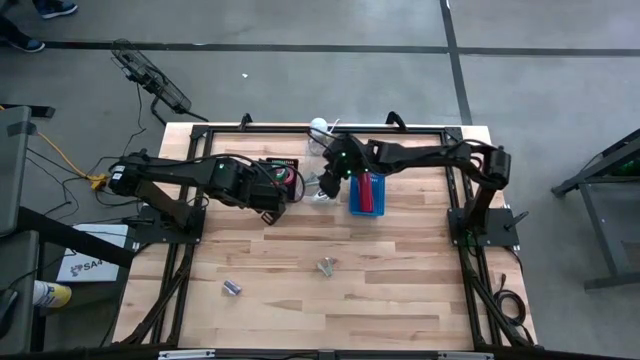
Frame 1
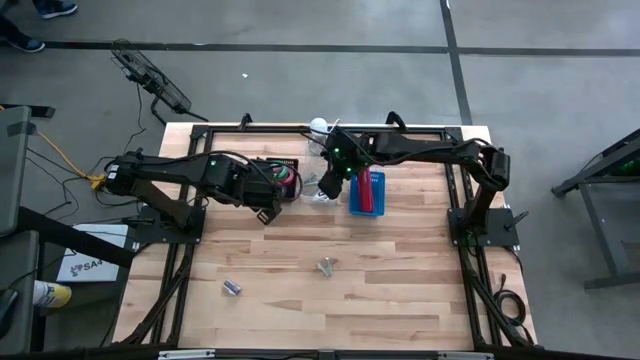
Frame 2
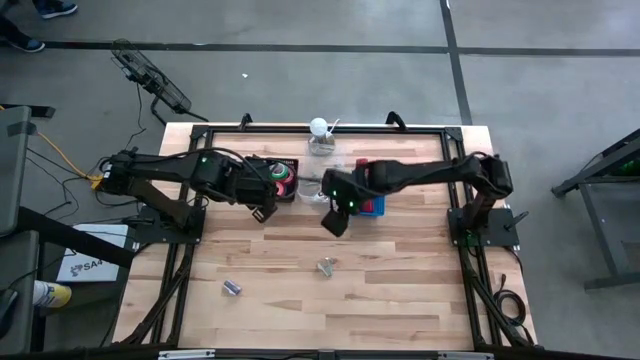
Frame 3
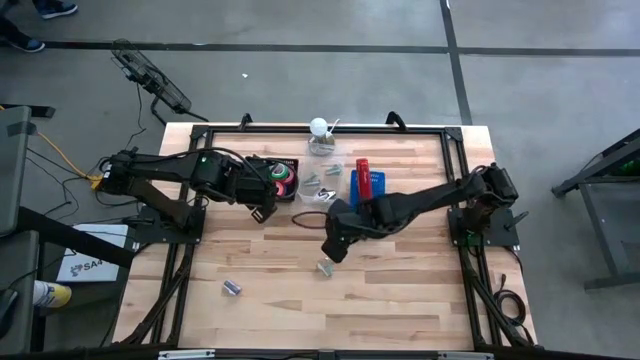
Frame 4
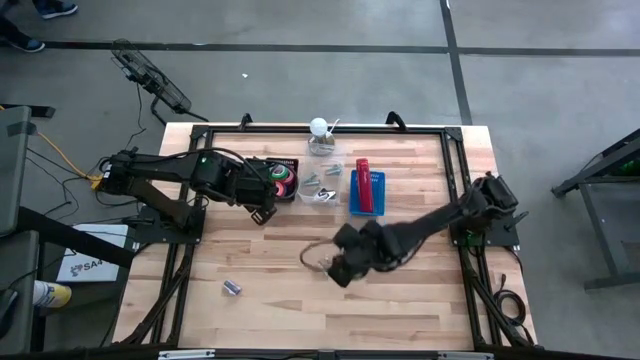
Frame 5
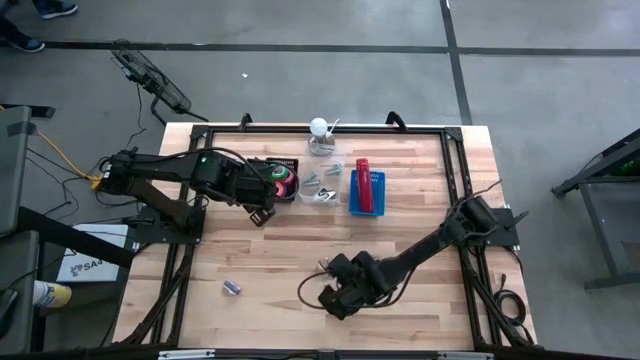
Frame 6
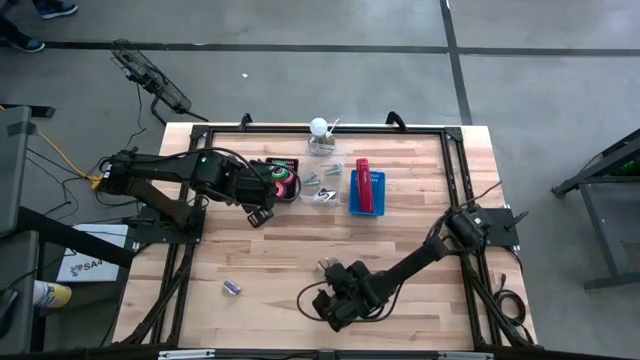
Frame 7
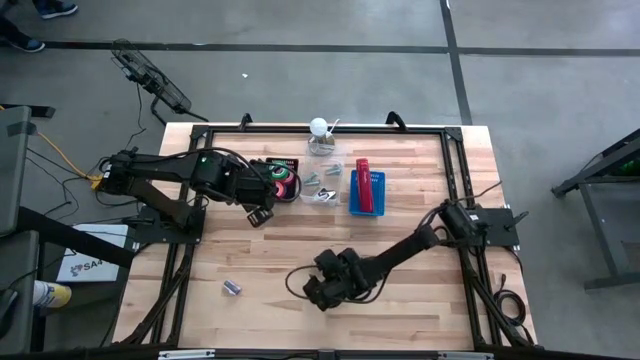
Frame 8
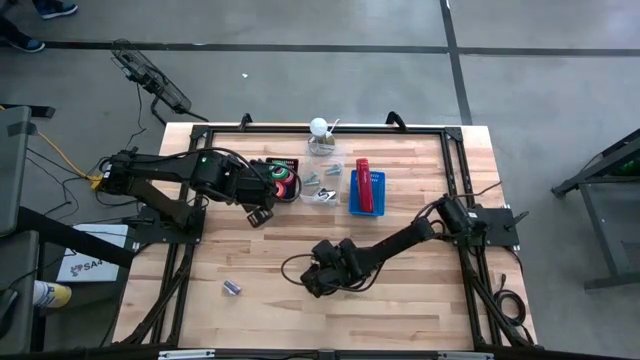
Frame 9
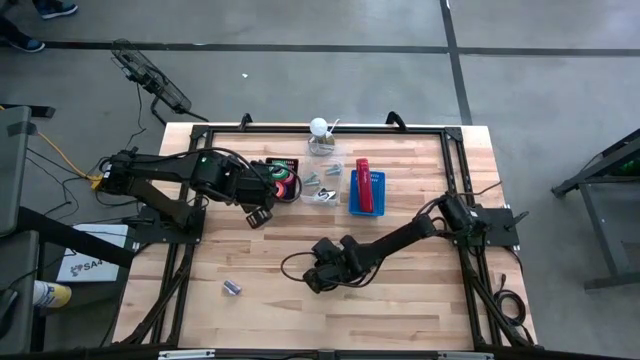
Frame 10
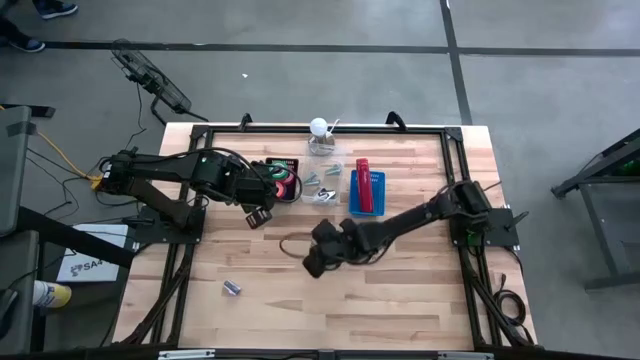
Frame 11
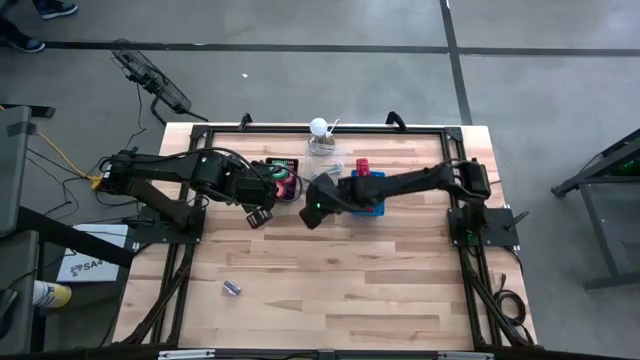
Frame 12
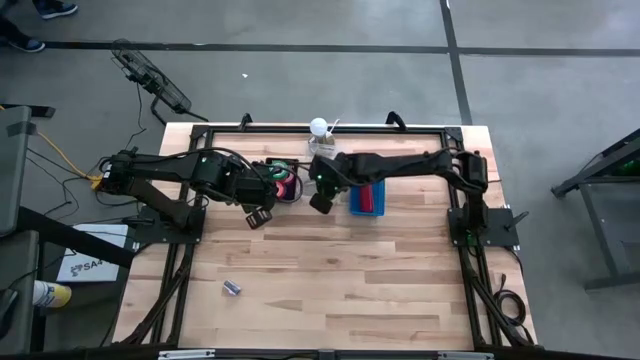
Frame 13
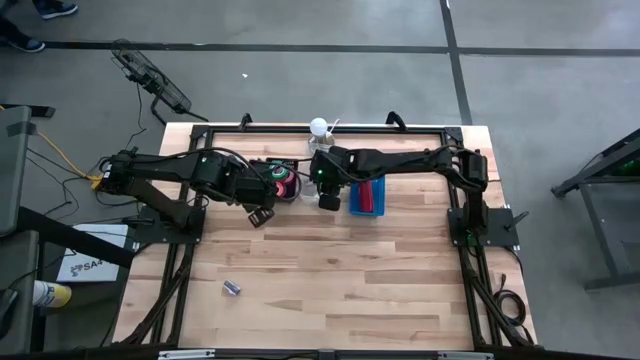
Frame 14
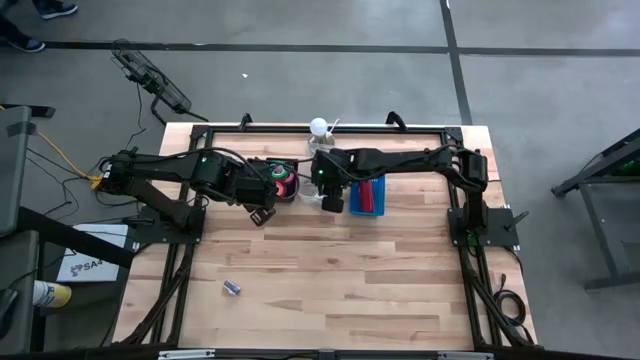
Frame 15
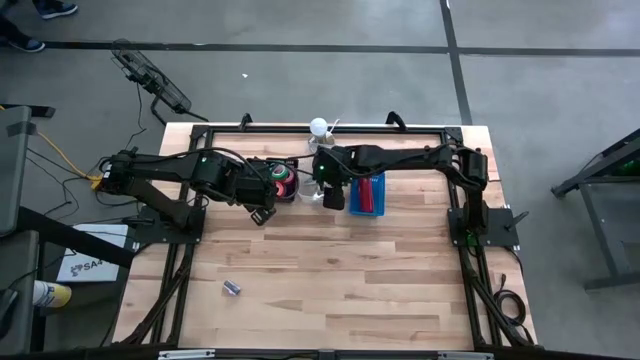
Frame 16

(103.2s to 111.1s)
Task: Pick and place Stapler, Stapler remover, tape
Put the gray staple remover into the transparent bin

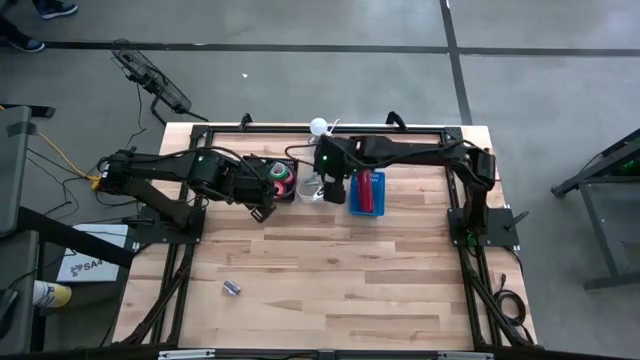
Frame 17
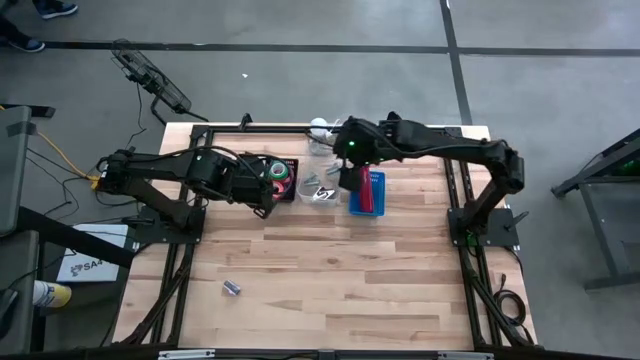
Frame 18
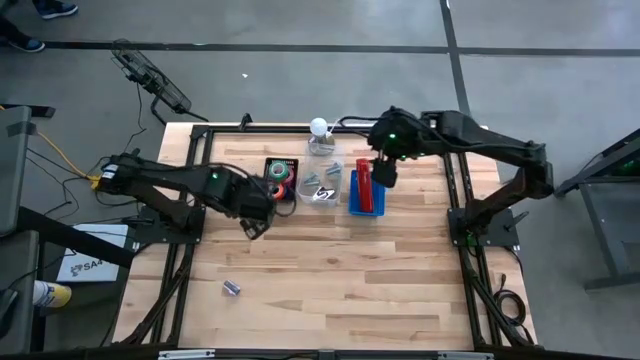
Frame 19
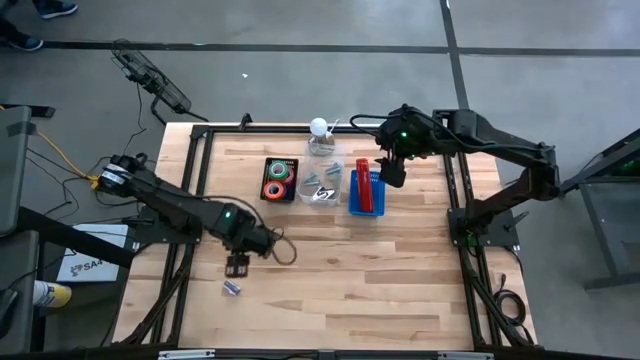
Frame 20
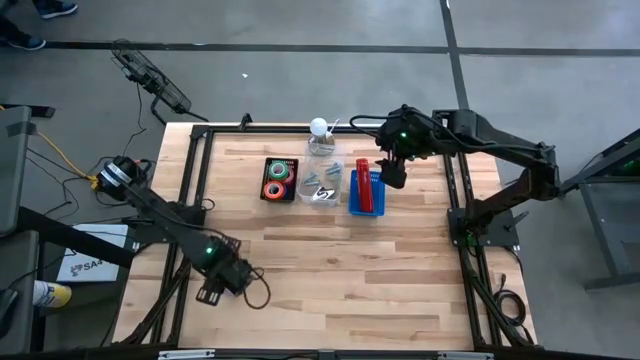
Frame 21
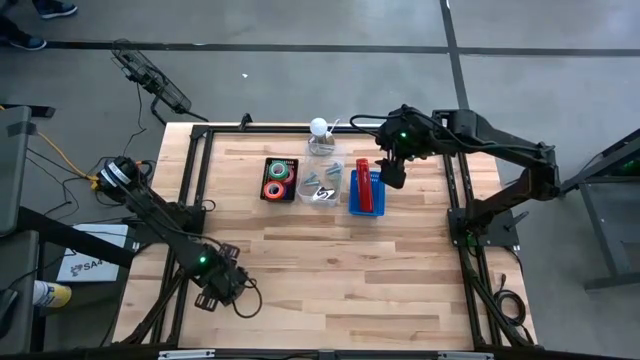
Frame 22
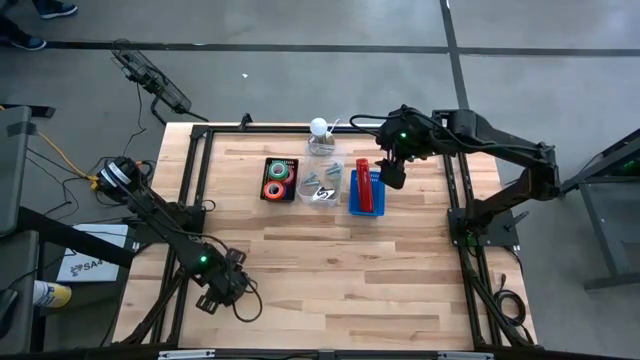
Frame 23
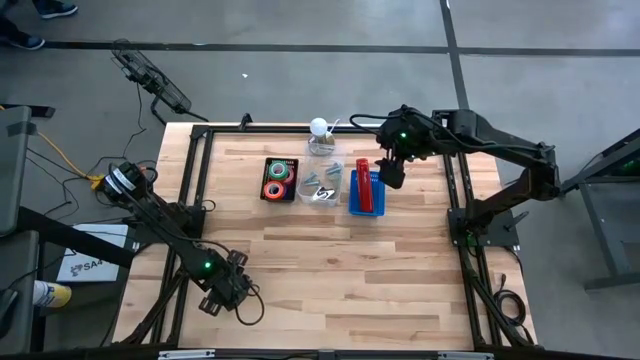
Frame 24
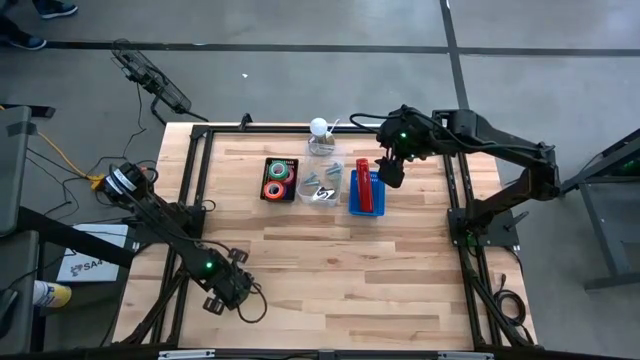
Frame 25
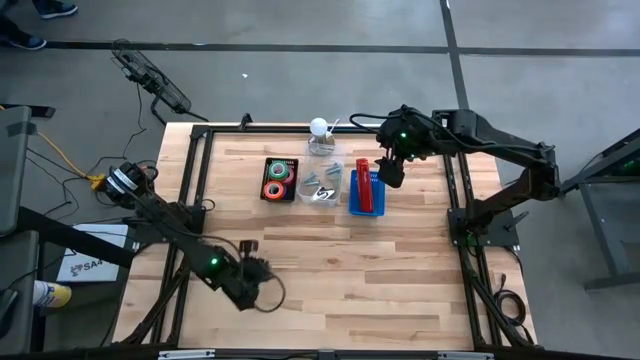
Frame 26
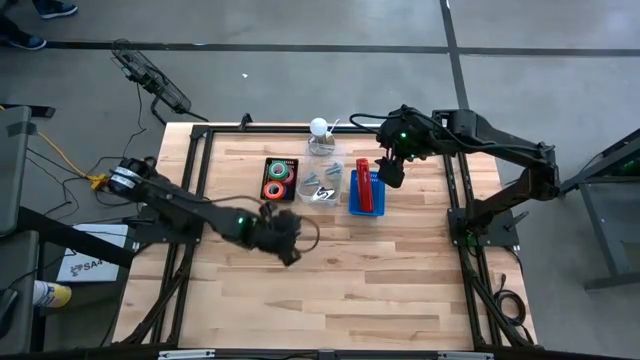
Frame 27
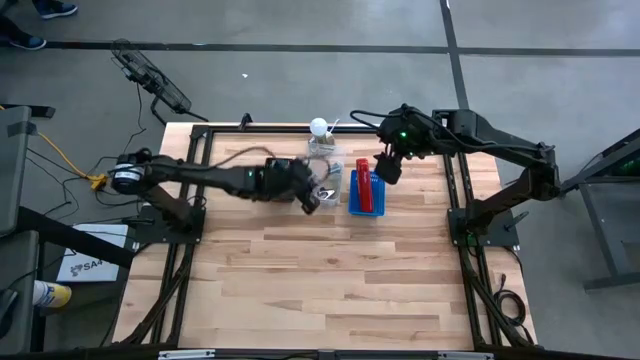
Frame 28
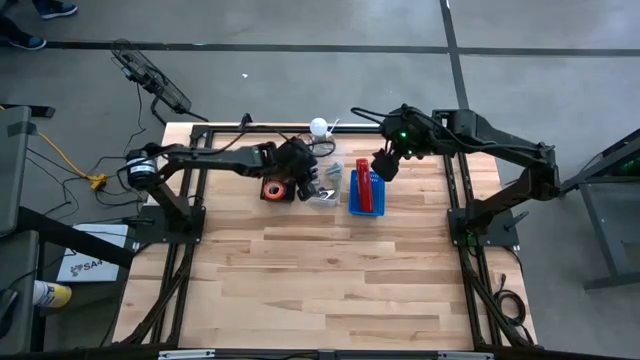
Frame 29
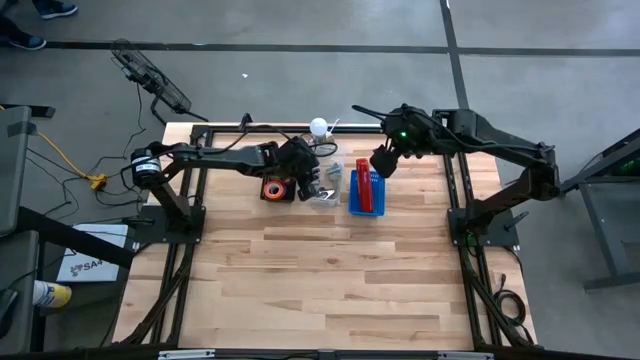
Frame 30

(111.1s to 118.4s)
Put the purple staple remover into the transparent bin

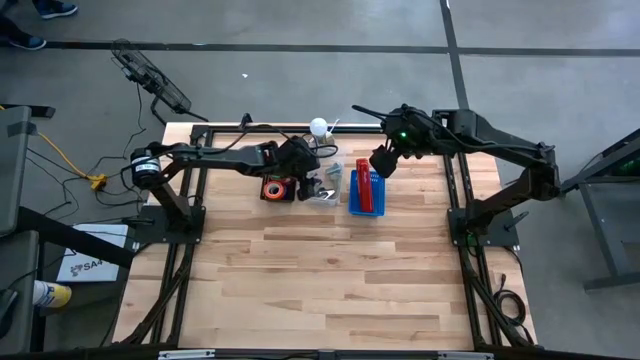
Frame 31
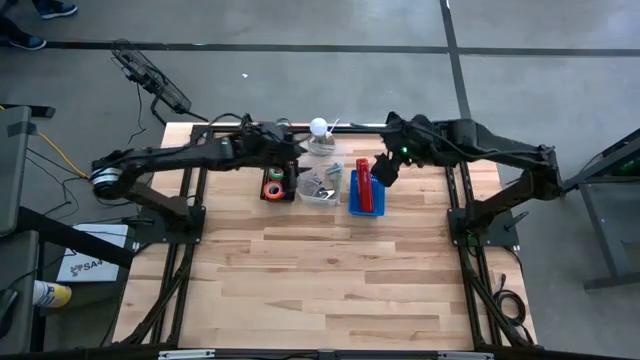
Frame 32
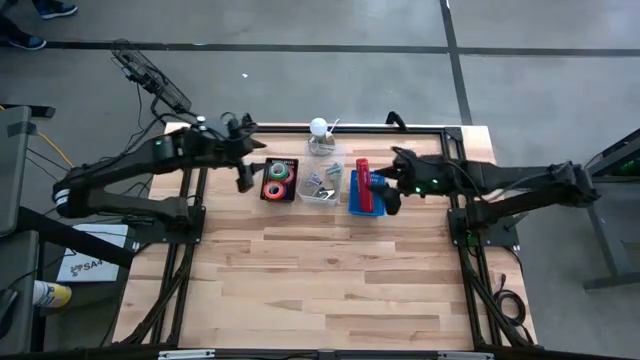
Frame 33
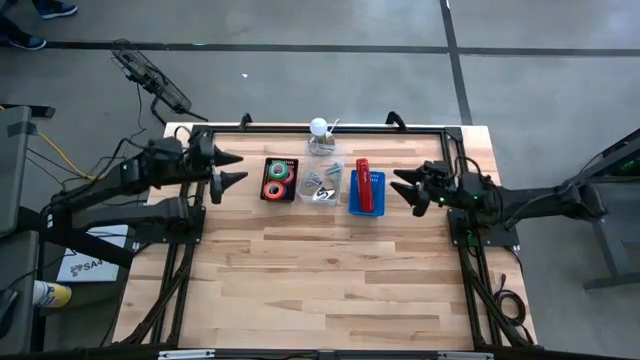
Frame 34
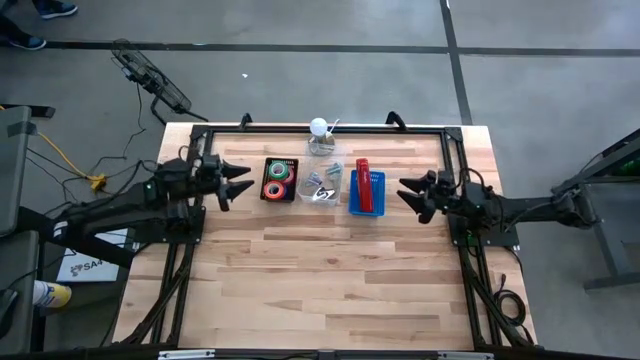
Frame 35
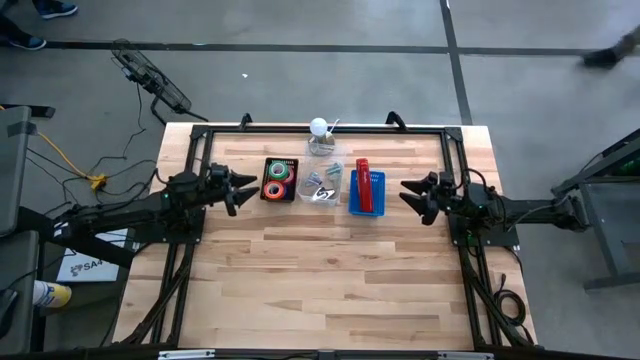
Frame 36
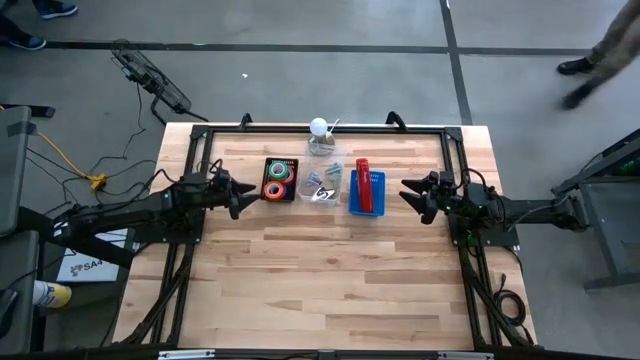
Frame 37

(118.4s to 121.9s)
Return to Home Position

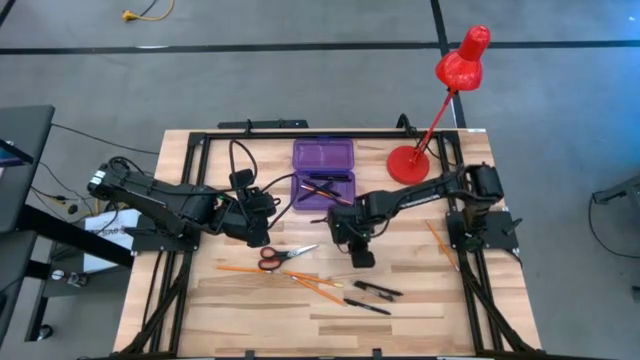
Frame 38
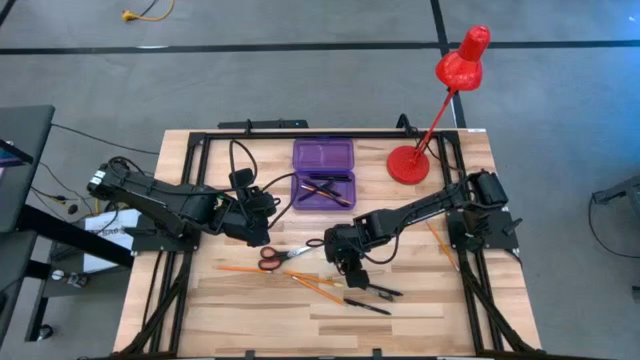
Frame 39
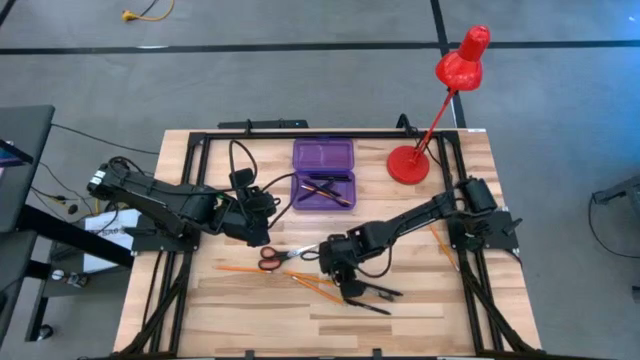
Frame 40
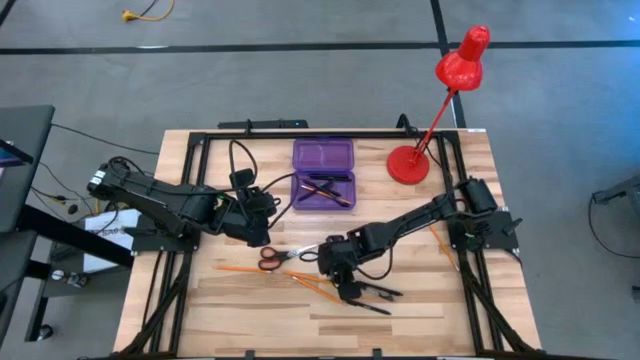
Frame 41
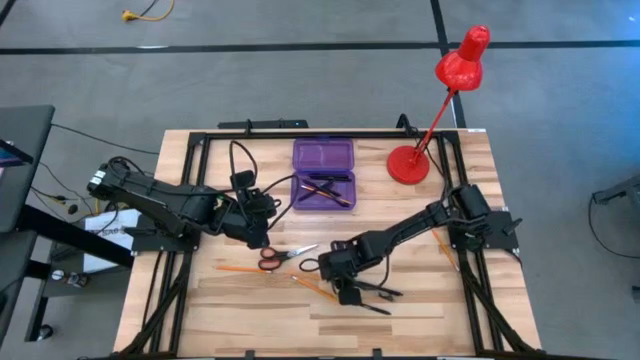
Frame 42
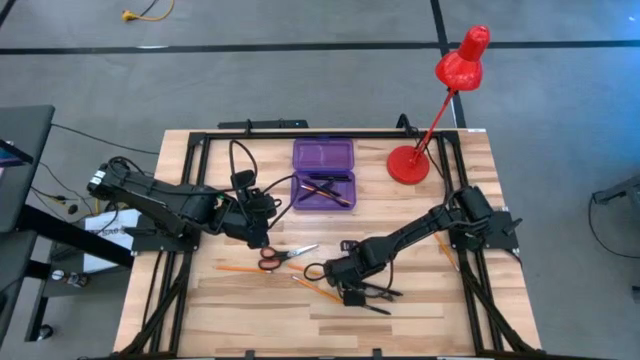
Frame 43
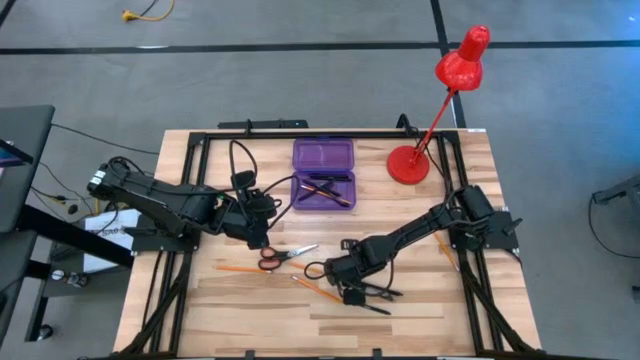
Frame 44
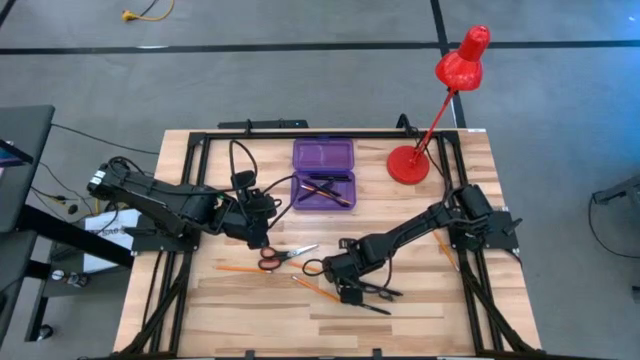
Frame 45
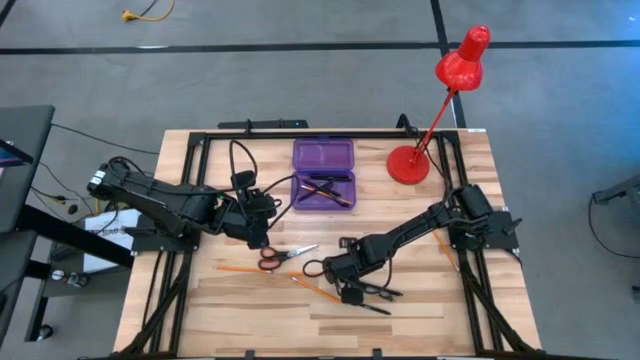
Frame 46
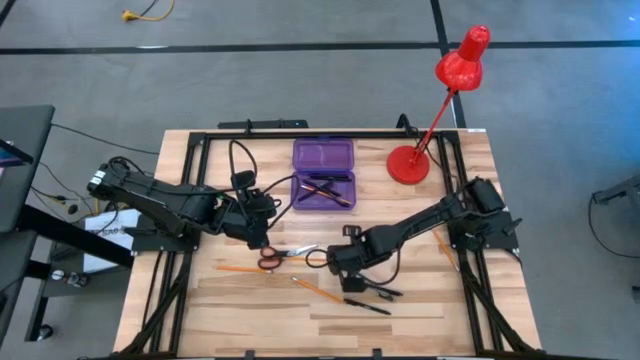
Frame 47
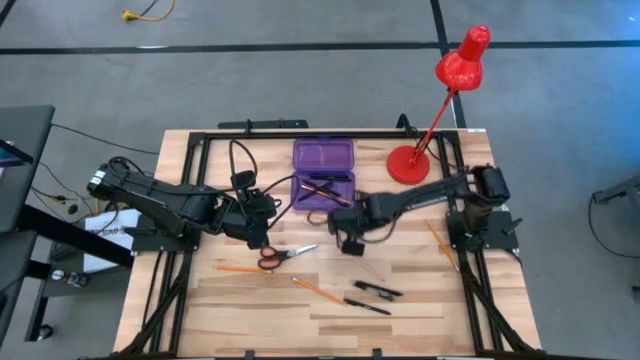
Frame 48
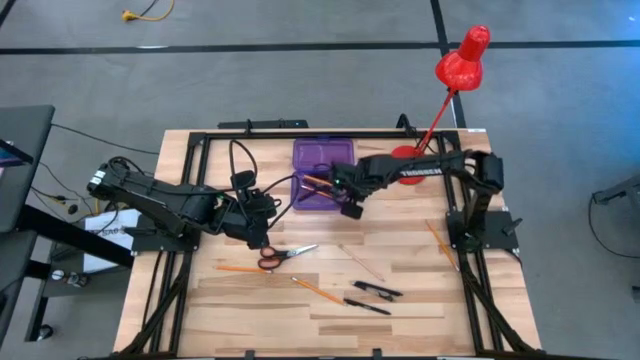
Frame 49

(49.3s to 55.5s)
Task: Pick & place school supplies into a supply box
Put the yellow pencil into the purple supply box
